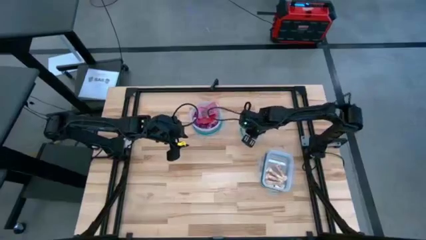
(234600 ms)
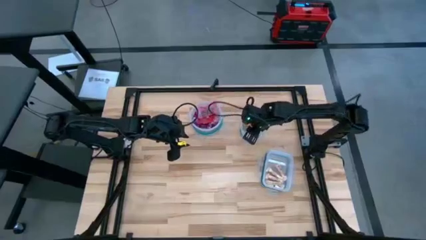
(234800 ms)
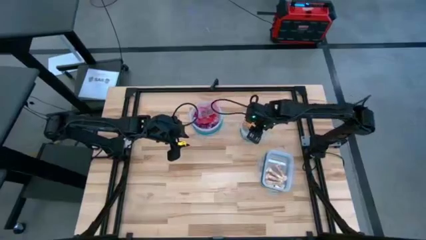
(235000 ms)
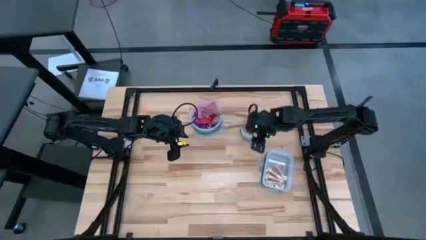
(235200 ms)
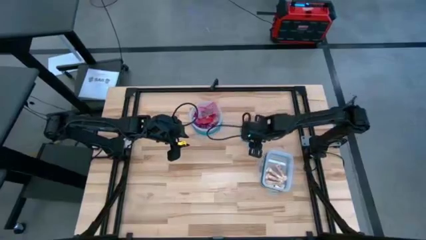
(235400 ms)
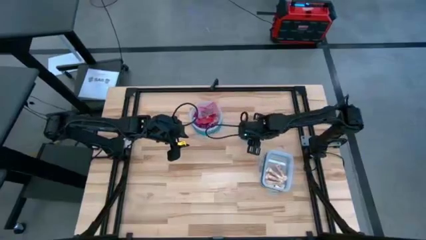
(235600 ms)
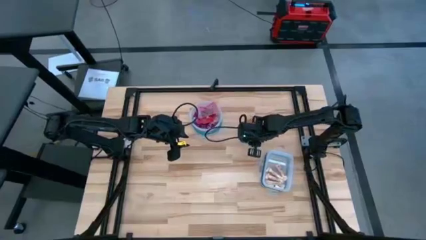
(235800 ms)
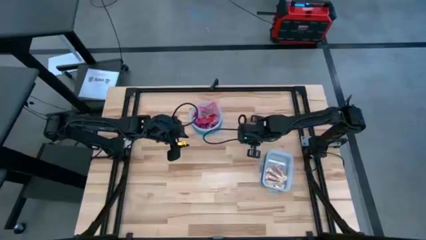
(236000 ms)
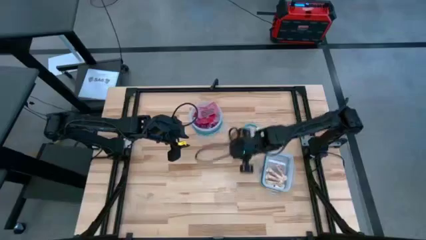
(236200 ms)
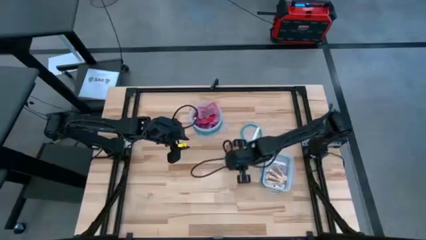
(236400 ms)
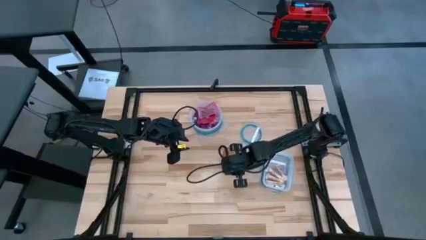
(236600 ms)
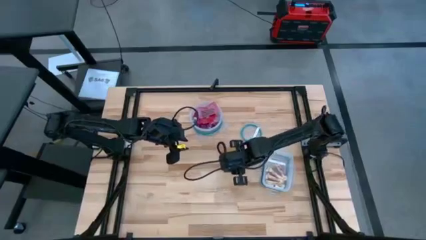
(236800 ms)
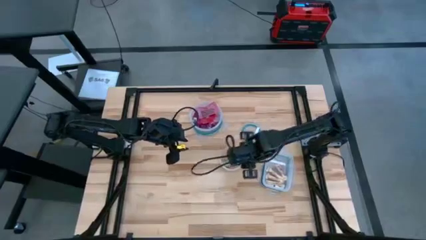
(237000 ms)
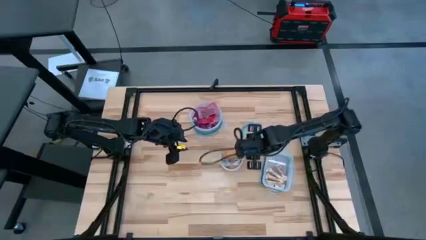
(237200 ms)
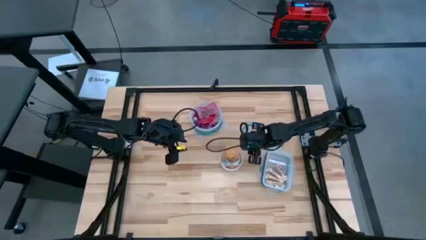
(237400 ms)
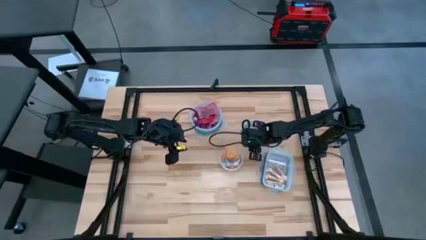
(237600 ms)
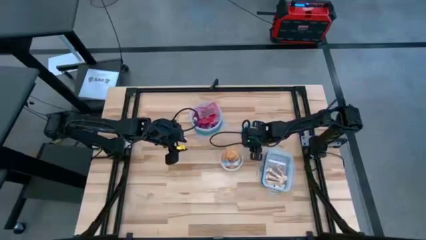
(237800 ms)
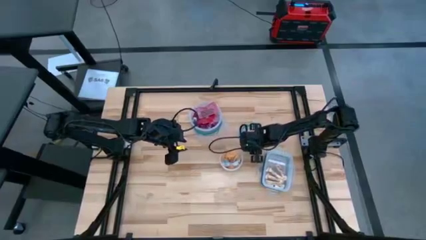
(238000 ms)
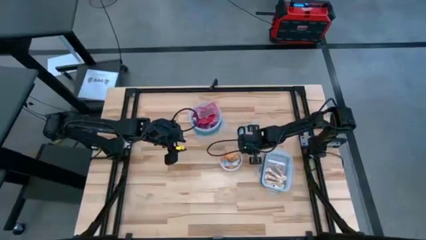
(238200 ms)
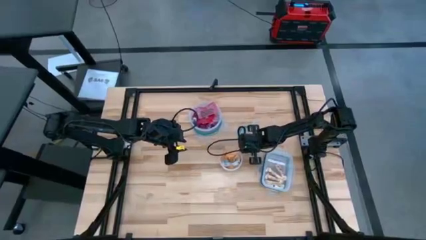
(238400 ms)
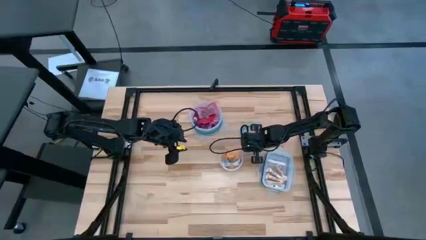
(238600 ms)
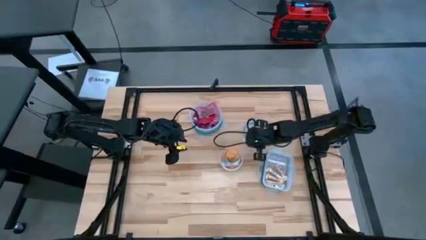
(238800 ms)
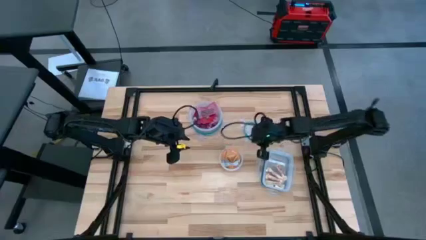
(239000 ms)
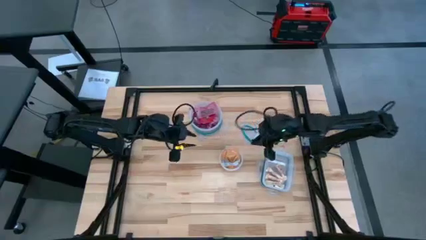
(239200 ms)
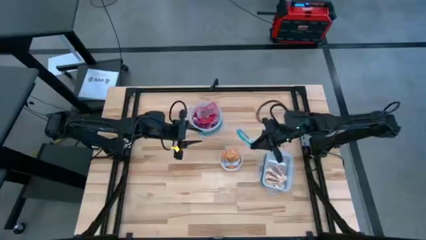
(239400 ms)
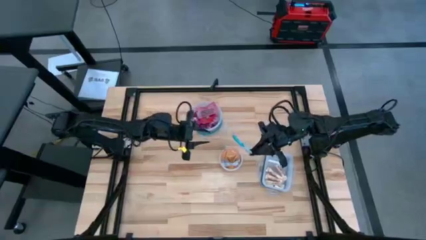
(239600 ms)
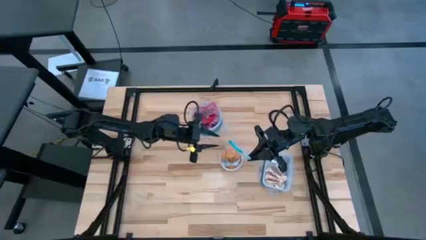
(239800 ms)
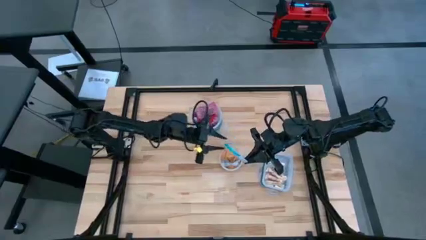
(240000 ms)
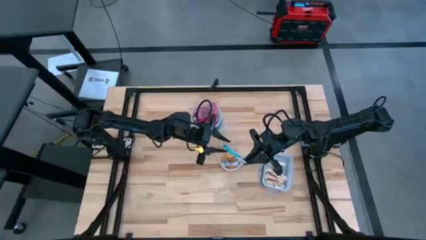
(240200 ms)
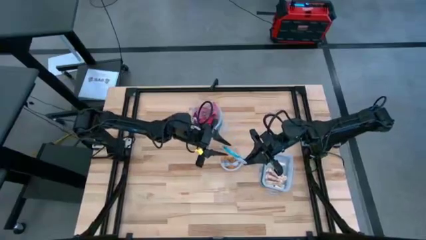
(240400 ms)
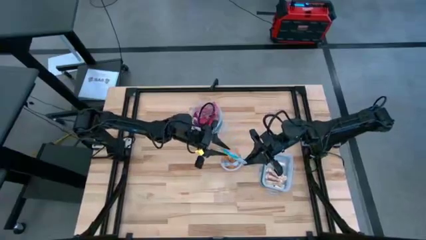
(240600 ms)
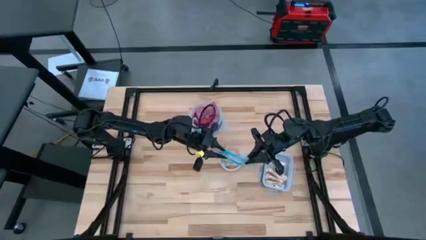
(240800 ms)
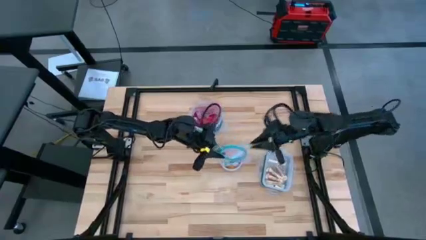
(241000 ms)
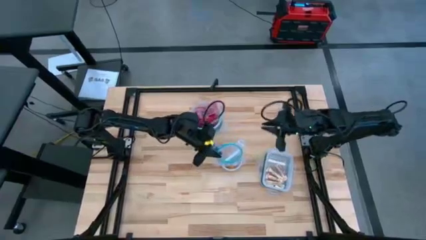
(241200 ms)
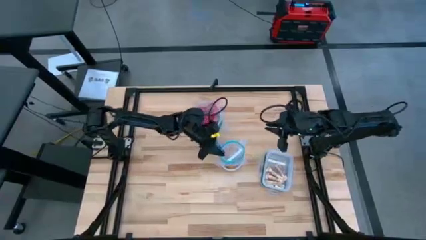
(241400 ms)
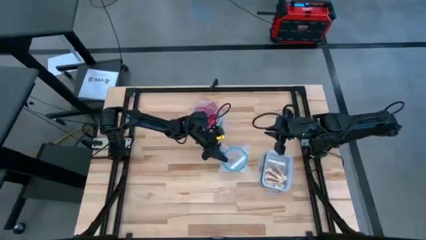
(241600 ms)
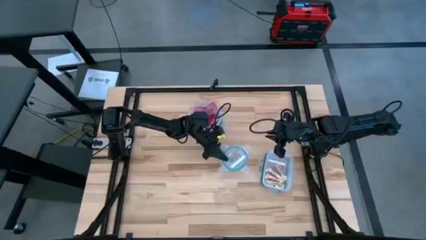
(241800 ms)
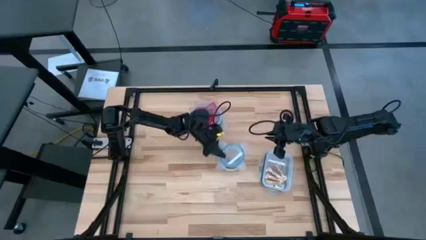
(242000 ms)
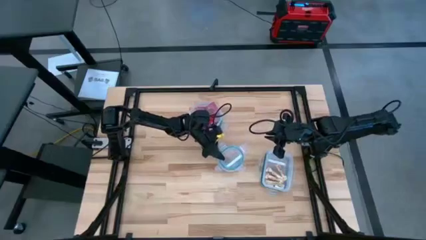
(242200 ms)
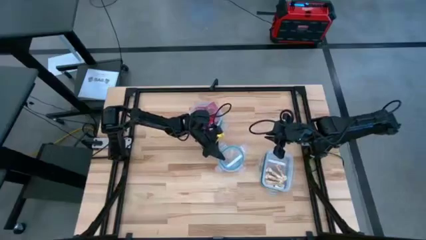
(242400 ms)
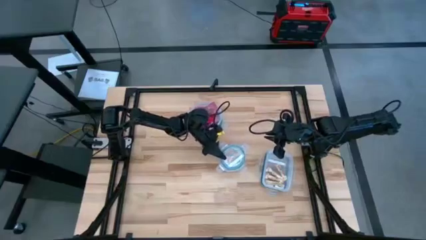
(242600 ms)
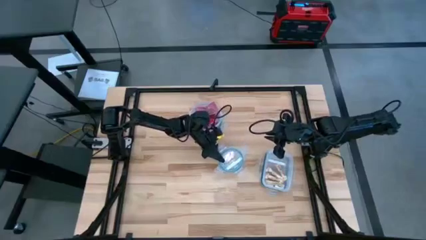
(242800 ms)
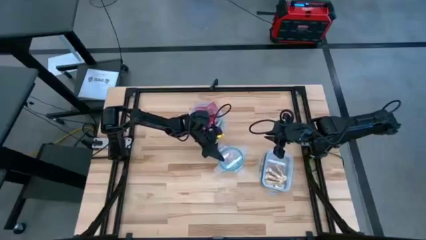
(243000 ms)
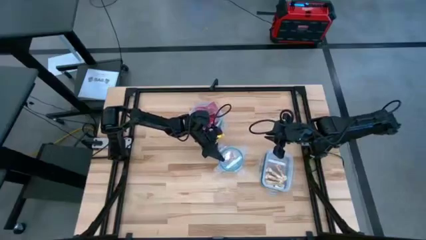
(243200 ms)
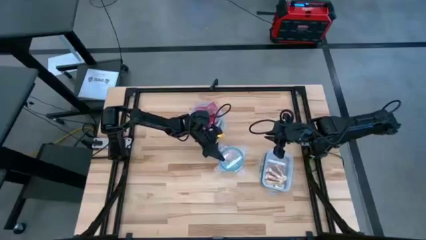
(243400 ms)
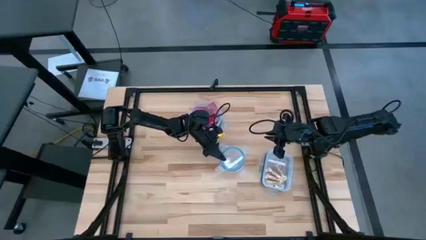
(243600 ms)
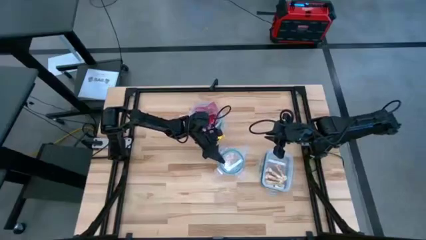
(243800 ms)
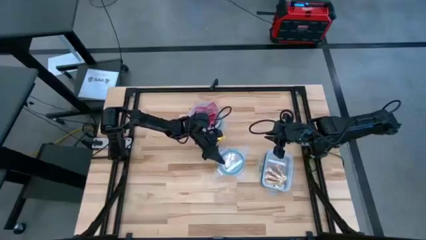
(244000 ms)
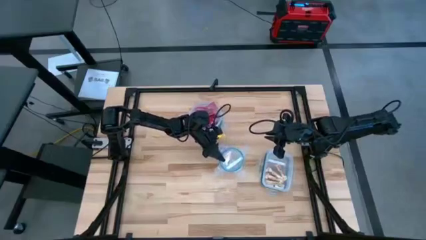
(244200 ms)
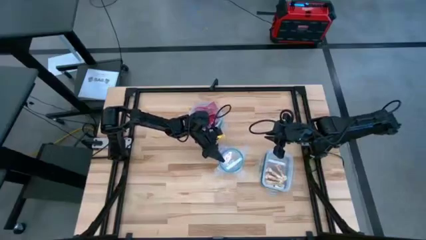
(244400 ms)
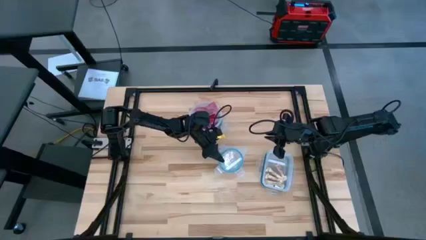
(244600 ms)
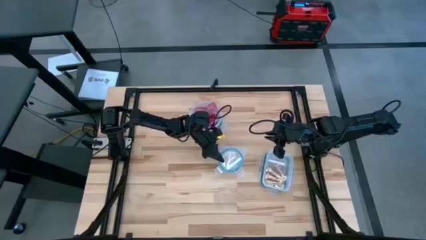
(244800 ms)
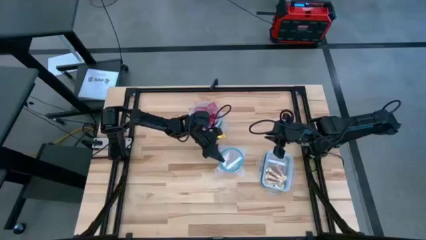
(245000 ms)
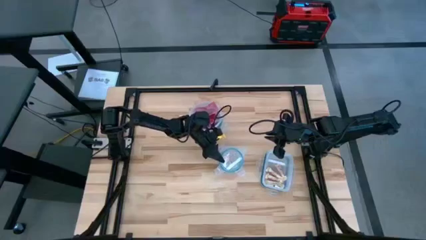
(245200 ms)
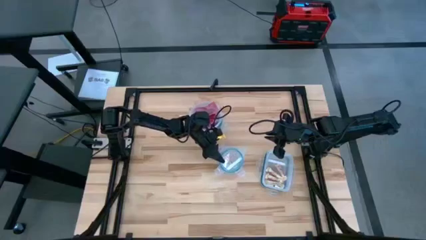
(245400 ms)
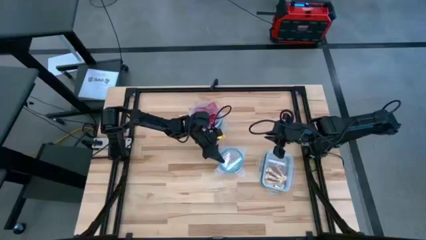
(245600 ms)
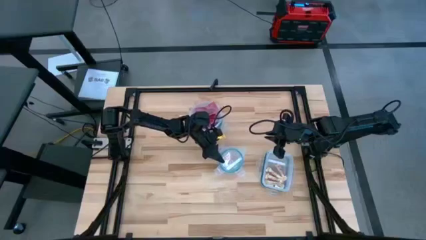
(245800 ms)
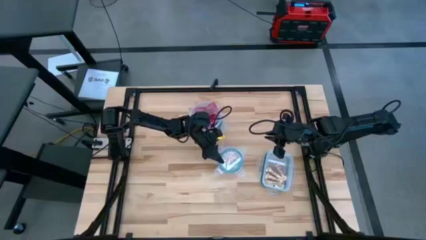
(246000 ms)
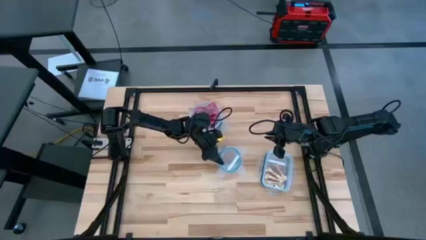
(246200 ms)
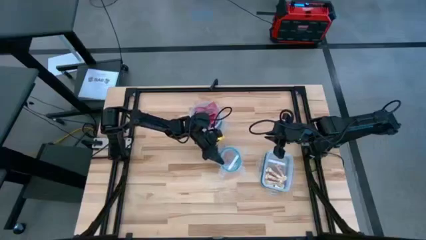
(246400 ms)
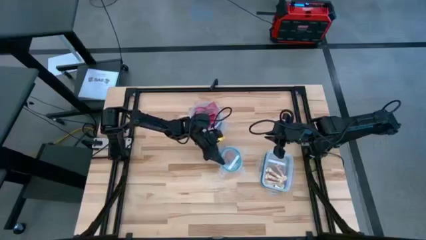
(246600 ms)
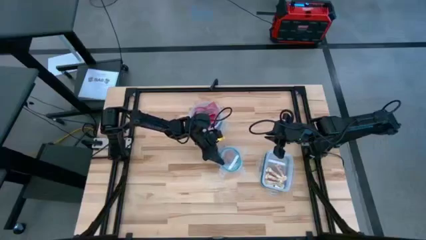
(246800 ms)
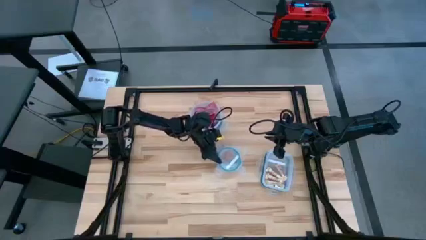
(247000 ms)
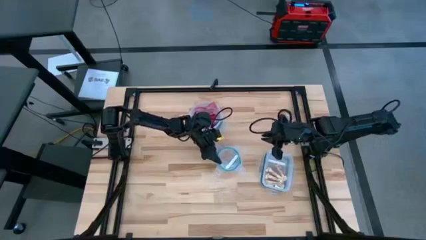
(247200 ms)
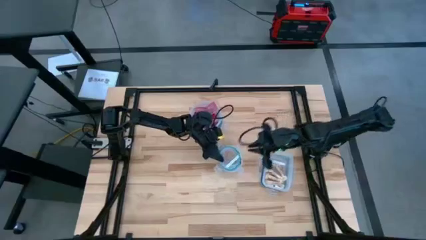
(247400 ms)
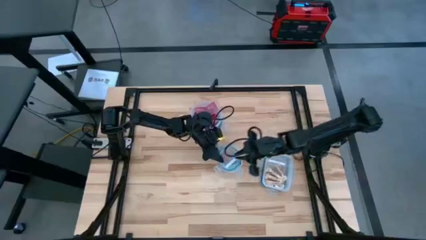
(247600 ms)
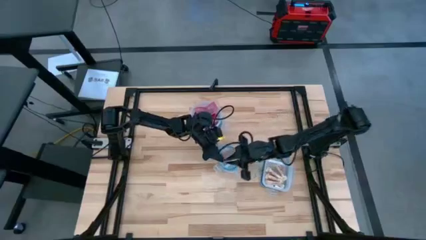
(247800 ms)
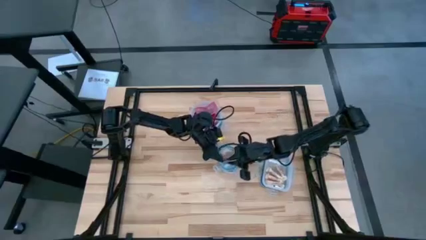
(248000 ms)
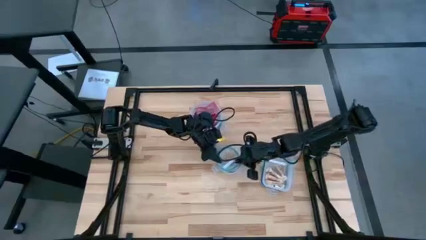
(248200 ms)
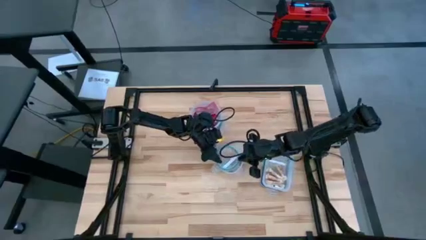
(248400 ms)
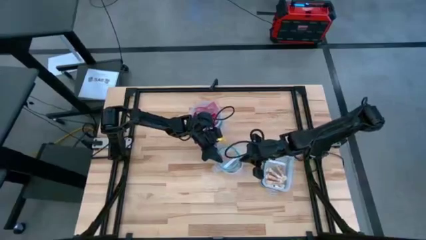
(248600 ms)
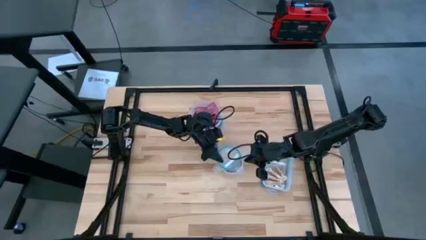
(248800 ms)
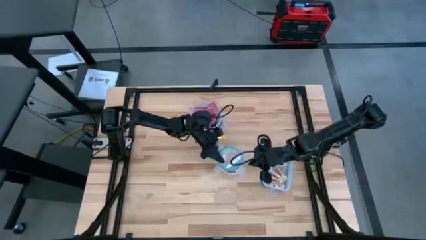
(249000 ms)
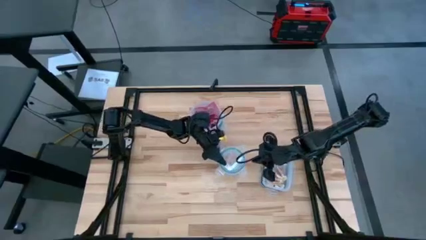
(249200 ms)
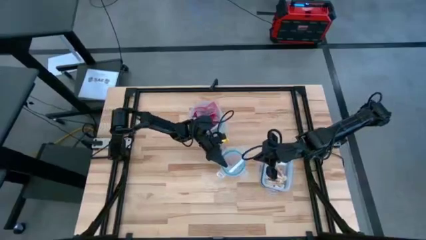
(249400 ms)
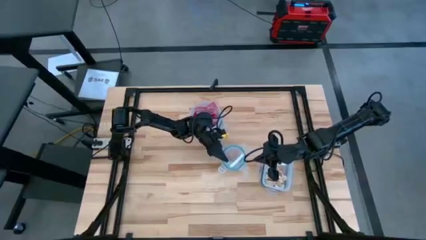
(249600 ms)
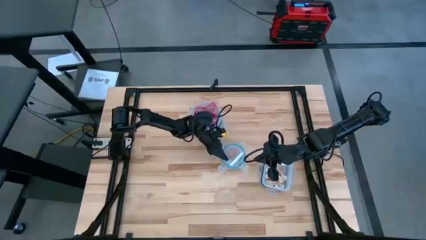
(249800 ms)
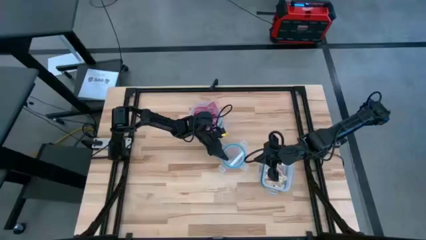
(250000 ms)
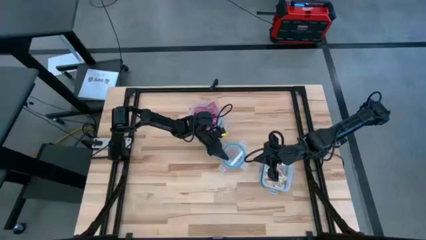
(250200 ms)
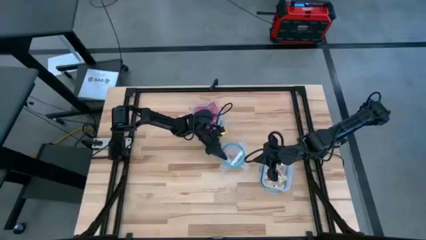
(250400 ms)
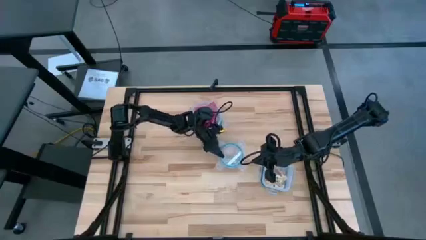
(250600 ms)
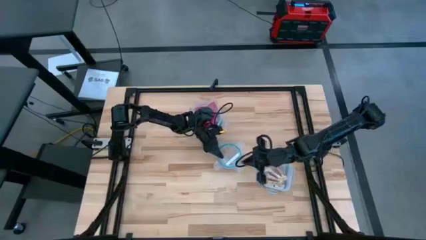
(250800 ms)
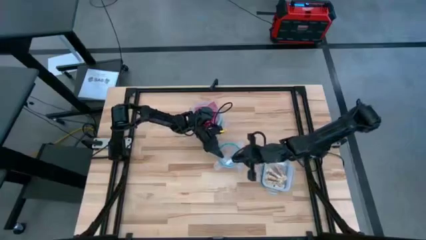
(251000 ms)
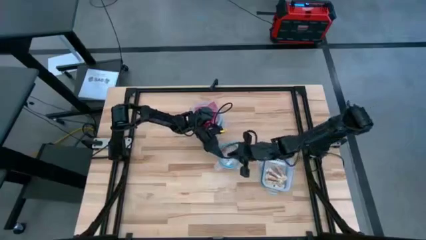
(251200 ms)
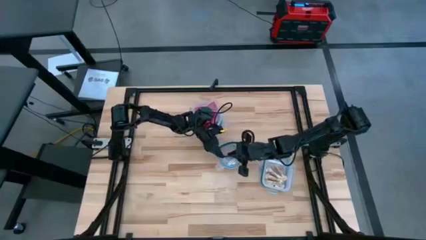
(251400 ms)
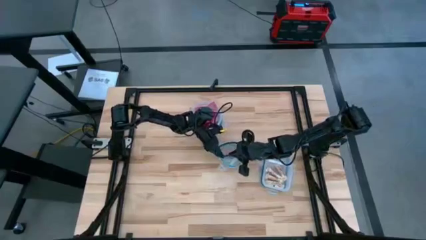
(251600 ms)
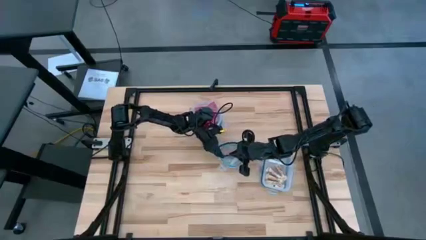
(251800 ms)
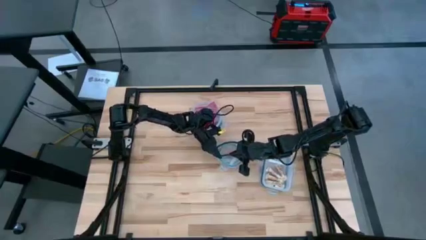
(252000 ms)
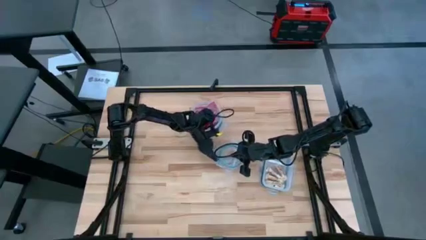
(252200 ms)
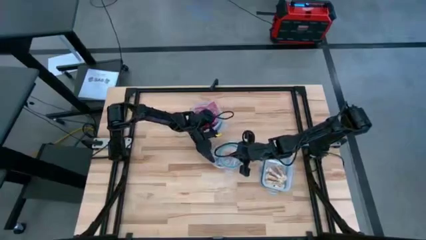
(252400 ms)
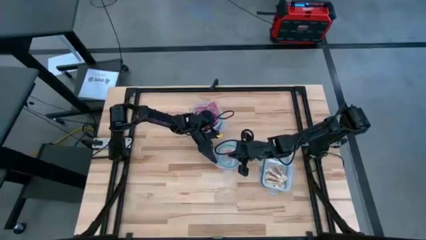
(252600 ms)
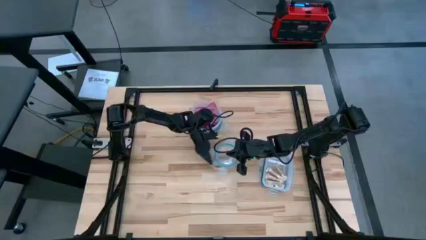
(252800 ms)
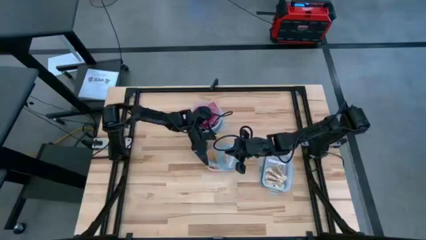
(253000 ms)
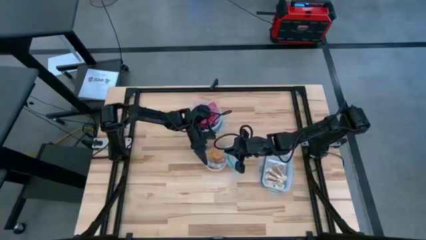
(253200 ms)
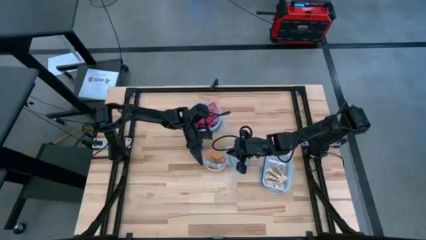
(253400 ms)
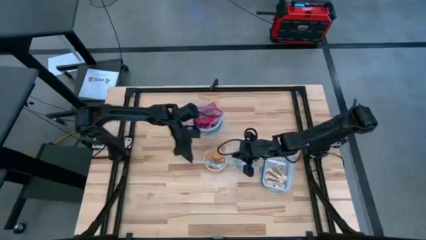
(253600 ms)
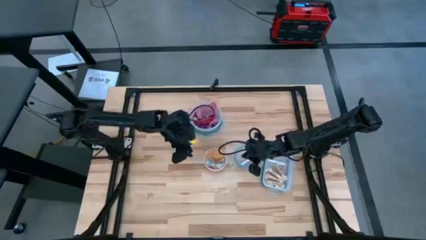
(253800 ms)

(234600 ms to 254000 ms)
Task: Sort candy
Close the small circular transparent bin
